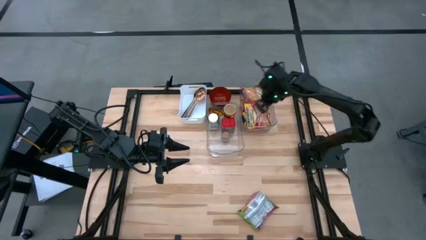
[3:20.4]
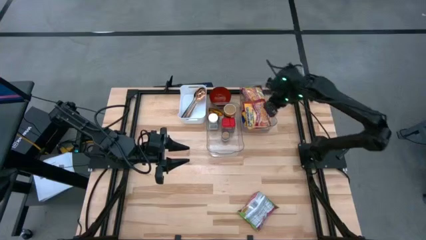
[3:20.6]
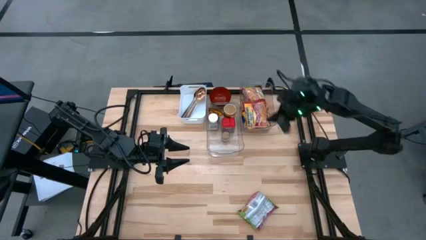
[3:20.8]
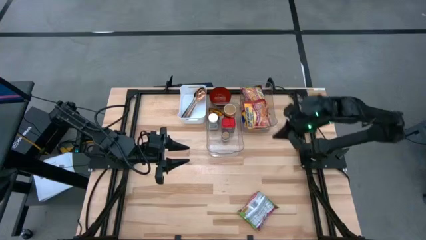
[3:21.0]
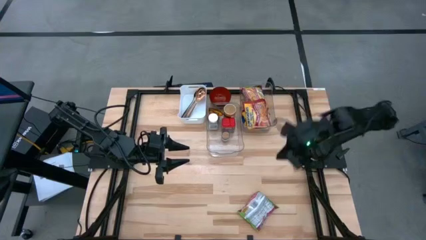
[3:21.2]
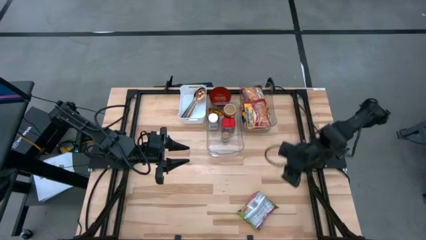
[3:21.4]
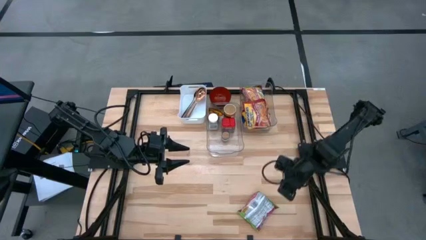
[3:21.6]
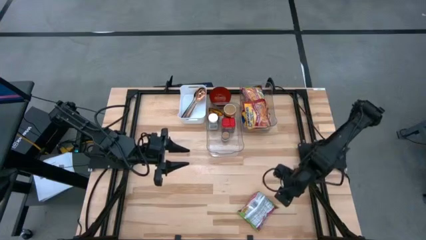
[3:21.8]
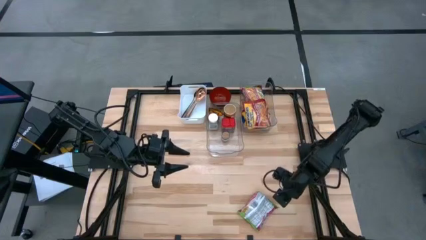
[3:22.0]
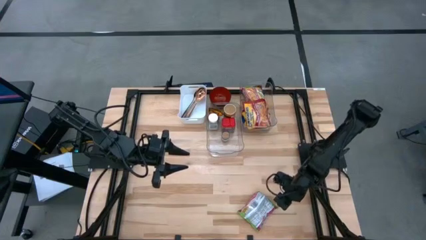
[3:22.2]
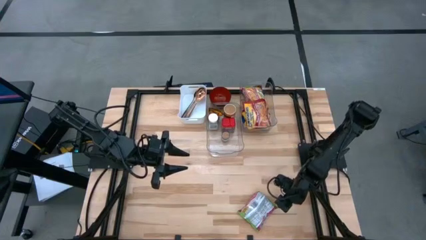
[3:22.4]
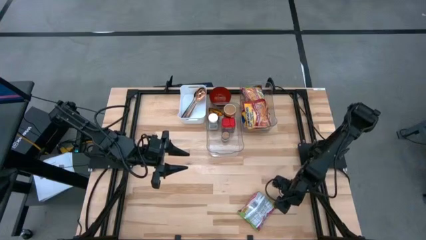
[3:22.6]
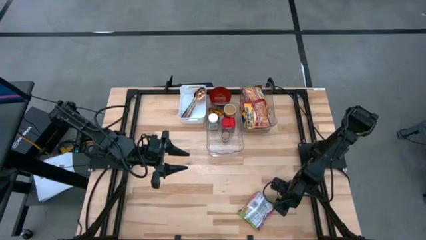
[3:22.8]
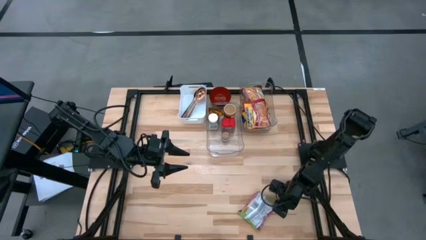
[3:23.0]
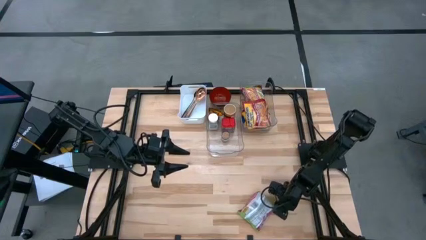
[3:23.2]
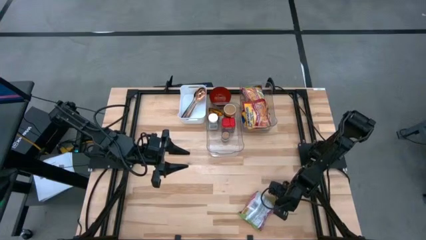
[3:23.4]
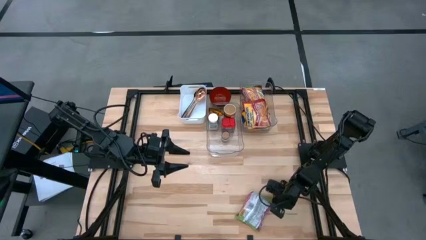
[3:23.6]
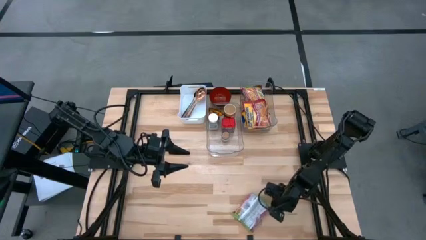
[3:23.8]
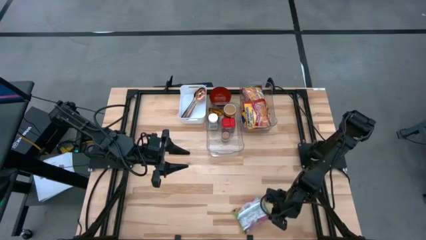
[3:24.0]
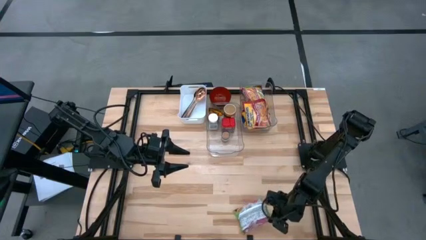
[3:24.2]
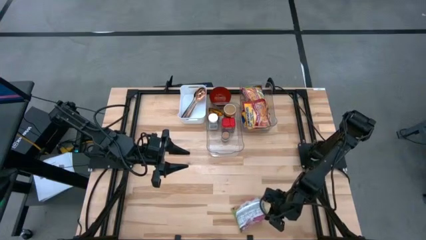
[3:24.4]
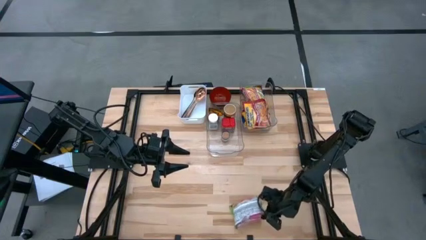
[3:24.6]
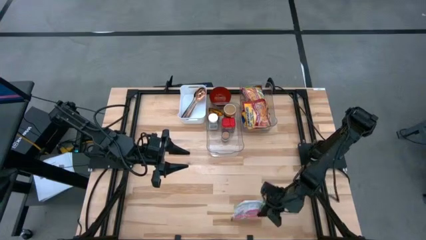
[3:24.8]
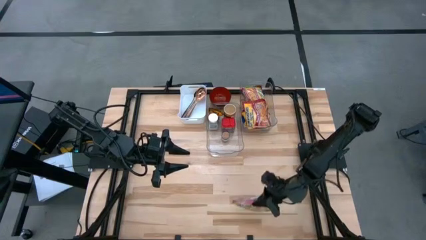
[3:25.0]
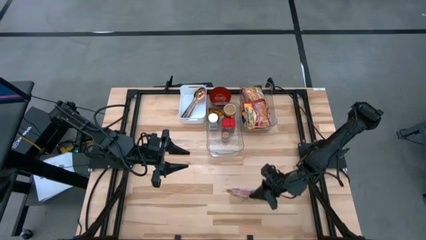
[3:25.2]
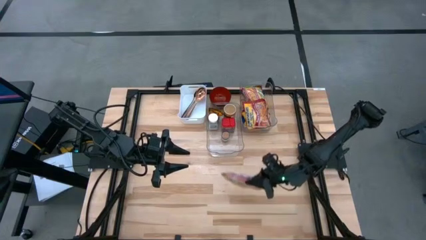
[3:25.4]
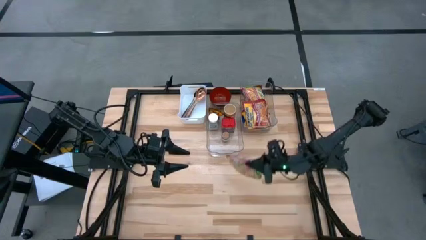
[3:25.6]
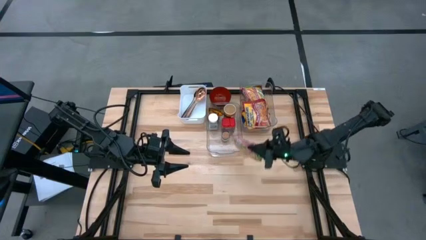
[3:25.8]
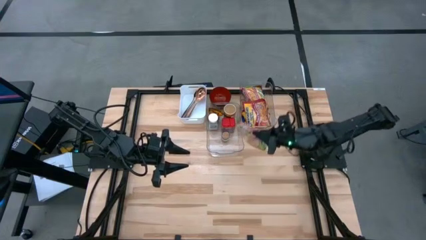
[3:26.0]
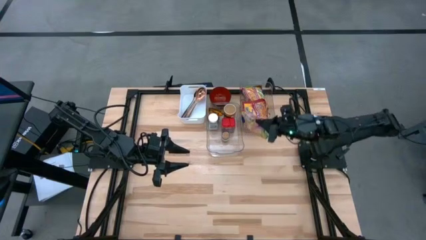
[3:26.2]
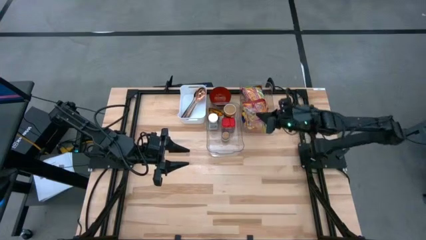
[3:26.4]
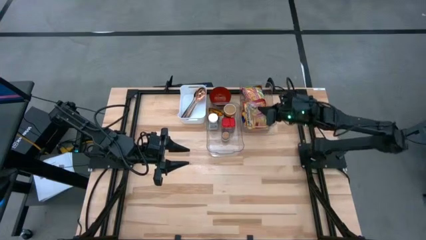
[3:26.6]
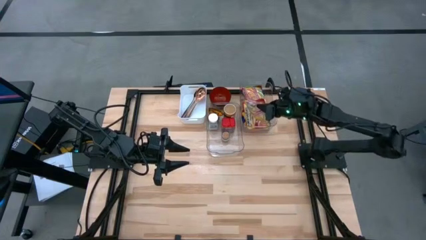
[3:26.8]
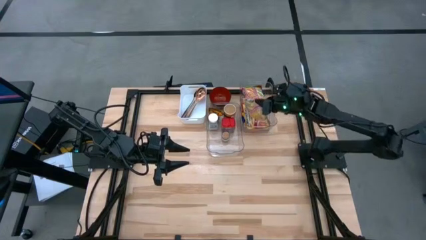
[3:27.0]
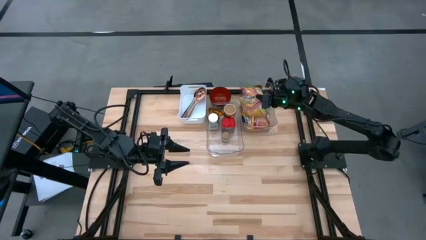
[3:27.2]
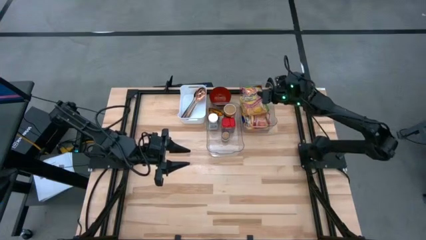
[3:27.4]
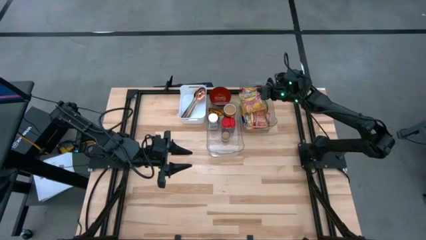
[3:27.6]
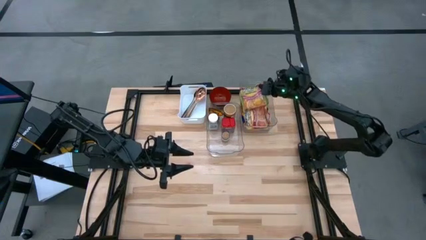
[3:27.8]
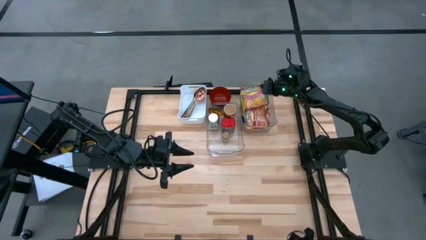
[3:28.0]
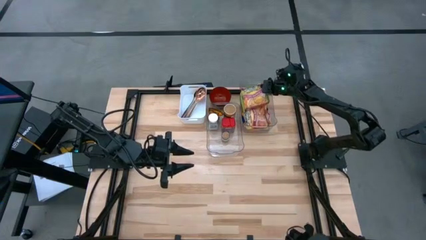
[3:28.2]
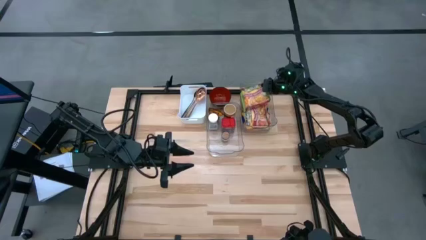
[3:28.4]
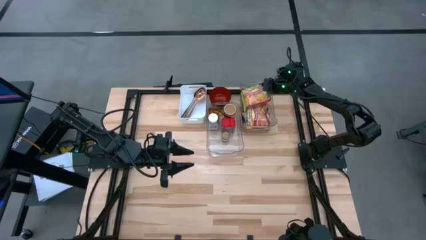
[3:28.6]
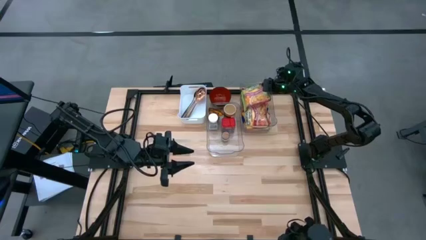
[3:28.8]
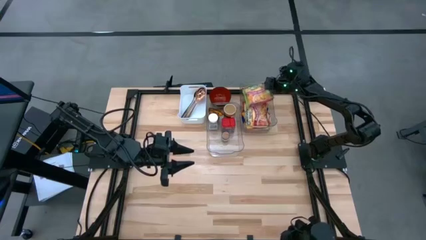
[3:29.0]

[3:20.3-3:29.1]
Task: Pick & Place Food Item
Put the green noodle pack into the right transparent bin

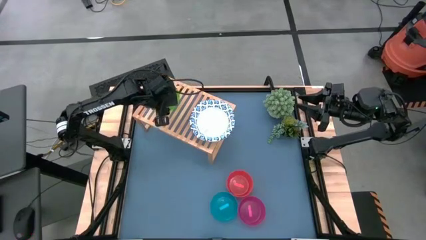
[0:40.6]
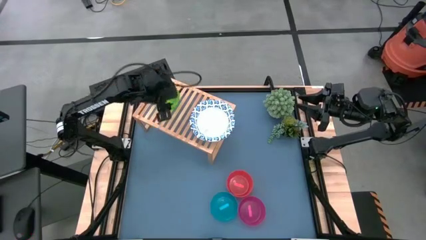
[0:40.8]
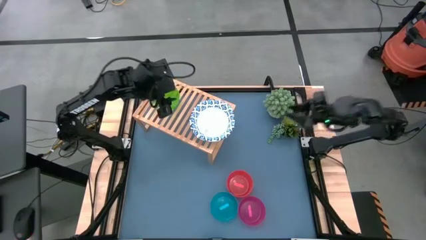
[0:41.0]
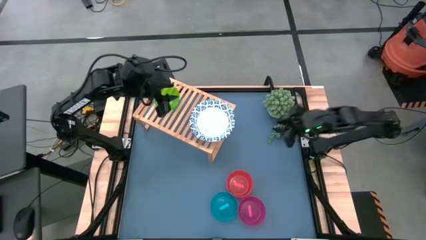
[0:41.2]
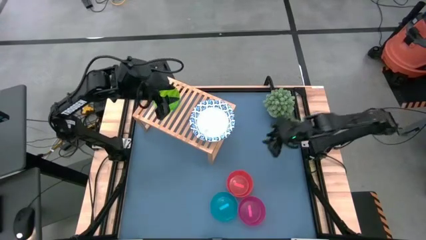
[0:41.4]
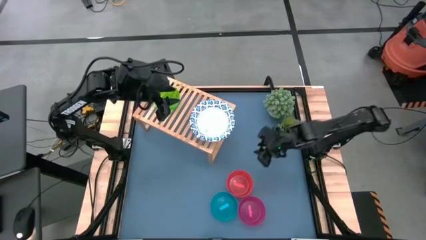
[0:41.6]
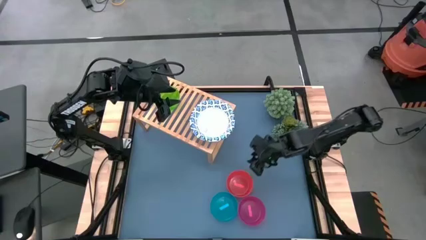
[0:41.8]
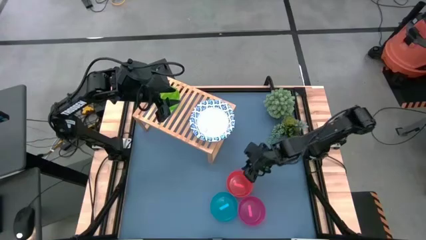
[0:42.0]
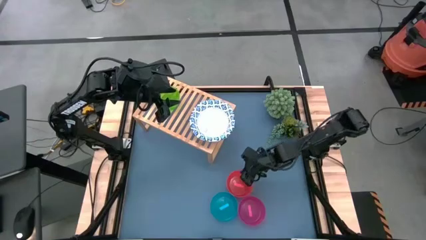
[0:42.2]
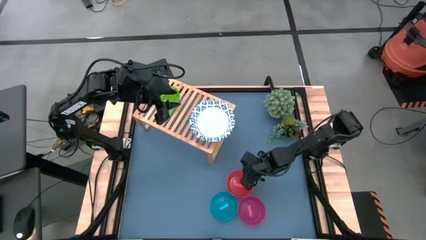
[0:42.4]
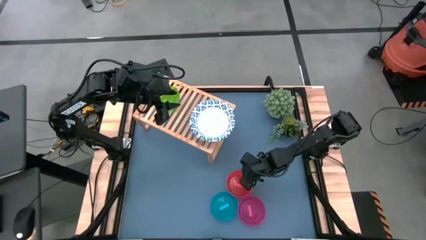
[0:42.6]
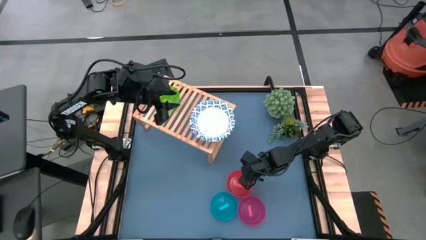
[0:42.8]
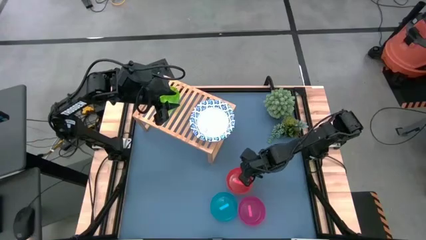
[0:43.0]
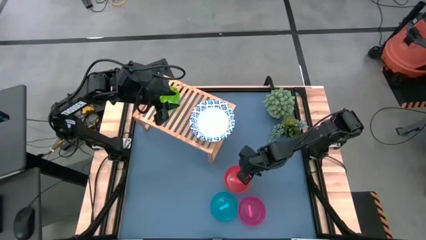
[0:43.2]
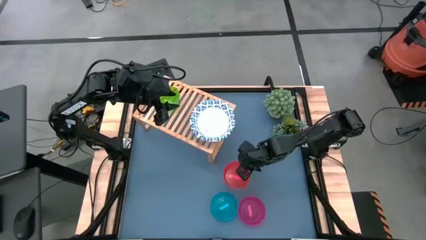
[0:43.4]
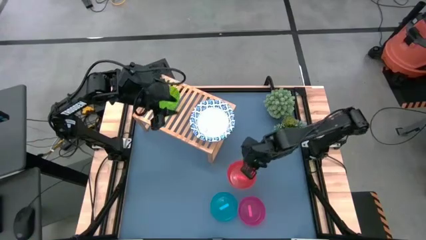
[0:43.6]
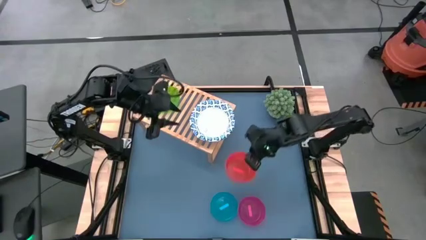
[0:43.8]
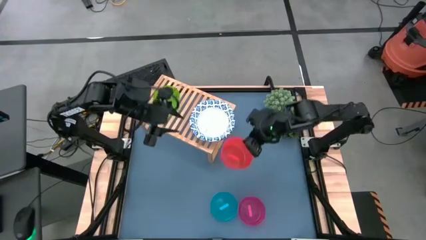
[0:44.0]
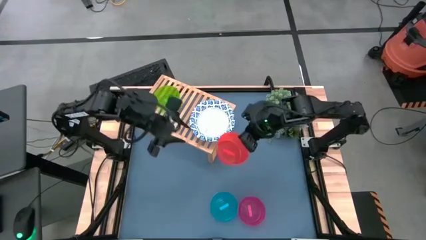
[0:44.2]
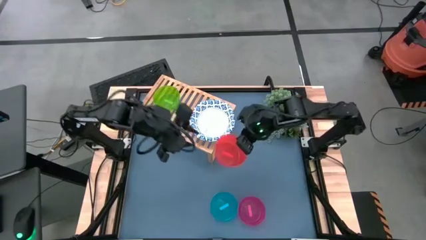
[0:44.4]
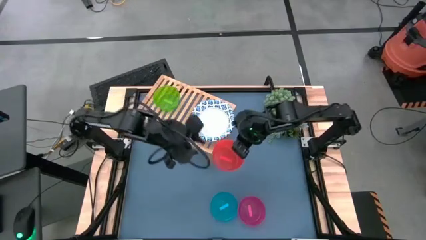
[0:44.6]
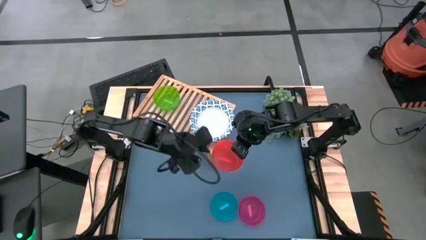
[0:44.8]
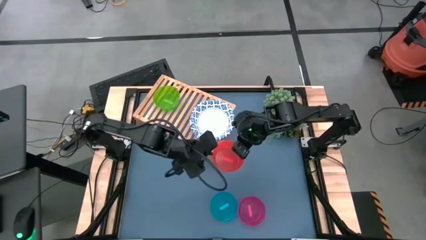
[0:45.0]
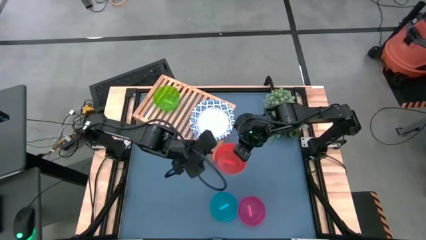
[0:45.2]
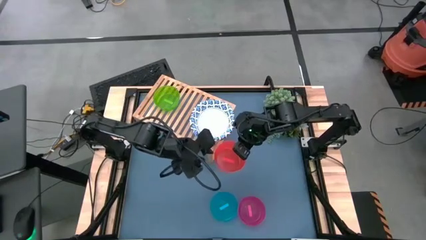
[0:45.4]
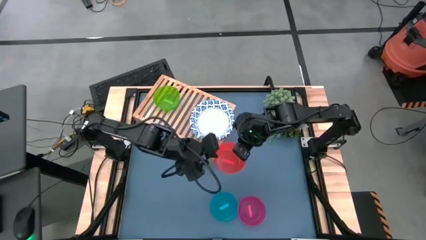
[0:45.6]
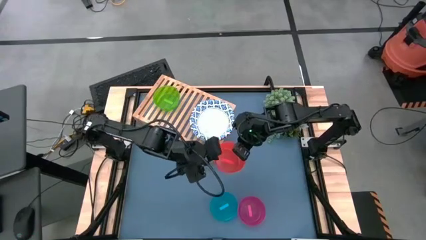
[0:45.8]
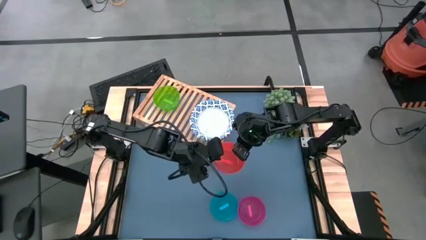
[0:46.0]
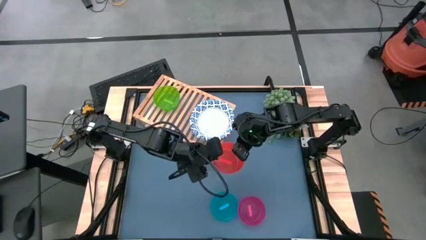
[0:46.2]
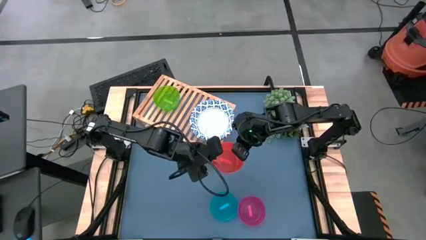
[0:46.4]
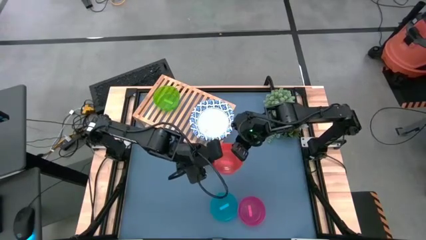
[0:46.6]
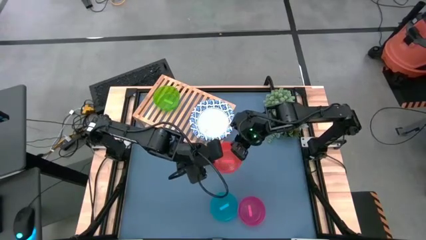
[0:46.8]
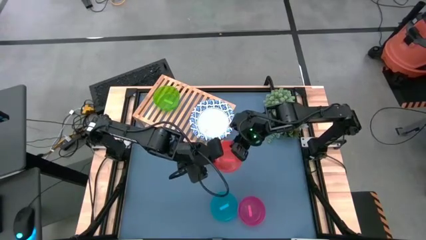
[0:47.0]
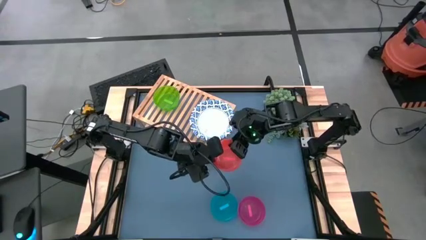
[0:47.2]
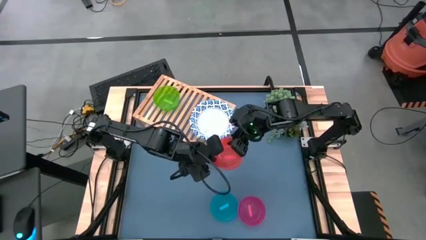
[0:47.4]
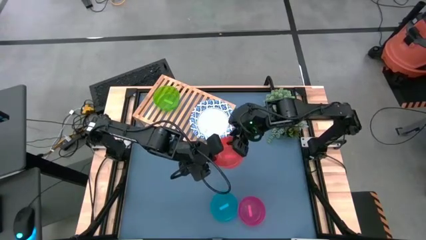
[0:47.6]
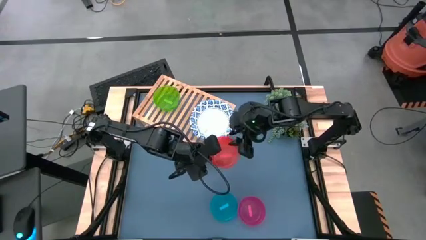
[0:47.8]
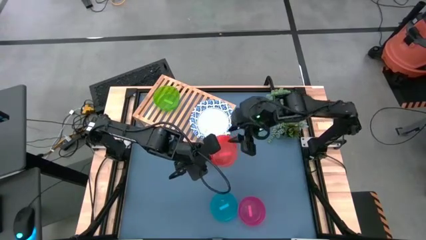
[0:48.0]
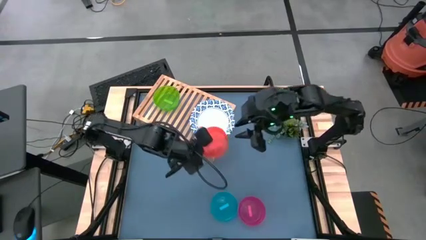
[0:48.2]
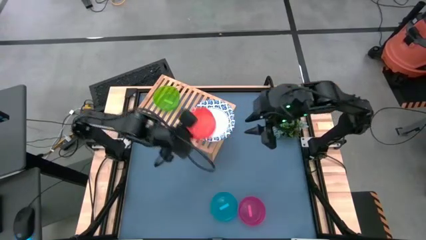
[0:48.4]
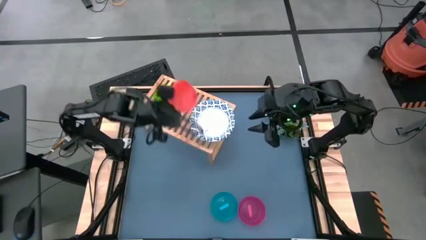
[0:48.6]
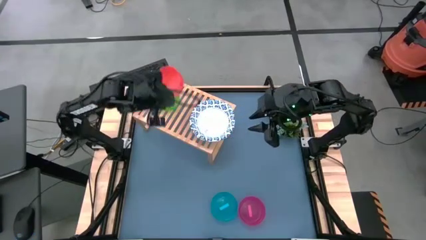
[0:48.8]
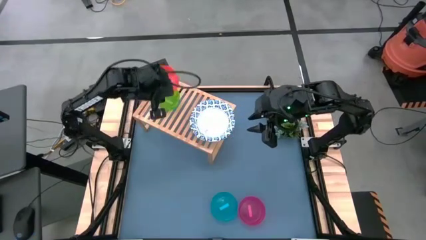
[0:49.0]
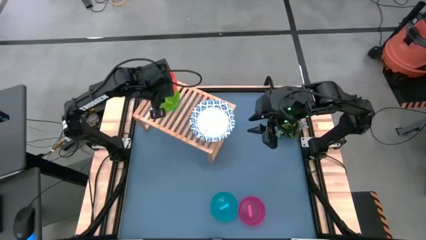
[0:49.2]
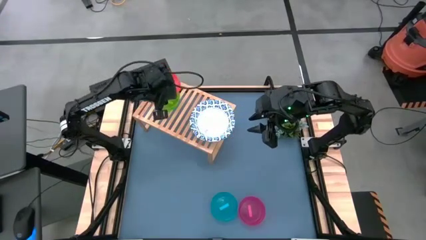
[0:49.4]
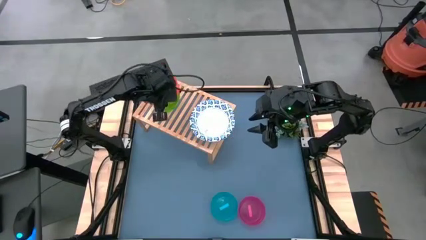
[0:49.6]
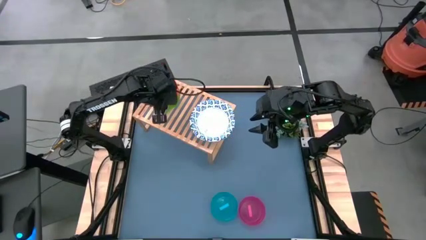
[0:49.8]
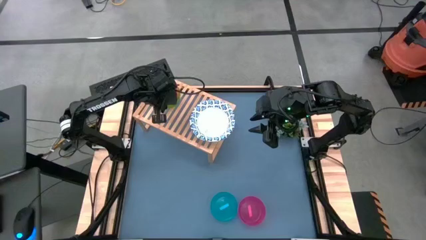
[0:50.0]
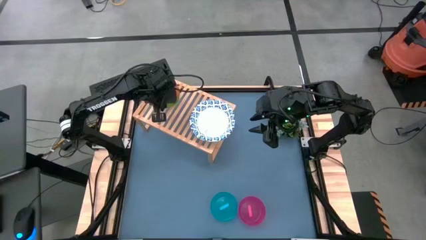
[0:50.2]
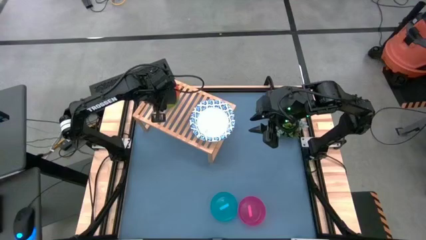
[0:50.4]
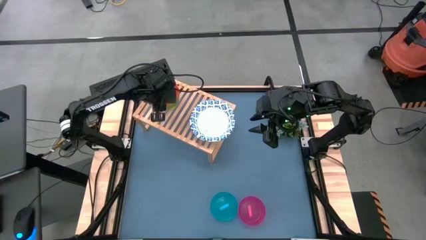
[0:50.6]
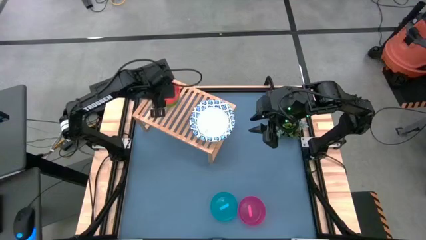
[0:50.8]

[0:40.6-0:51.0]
Task: Place and stack bowls onto a shelf
Stack the orange bowl on top of the green bowl on the shelf
